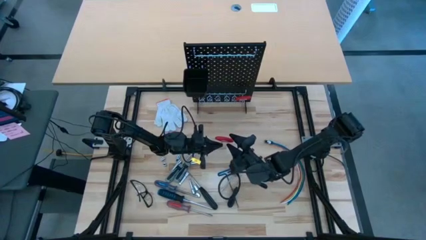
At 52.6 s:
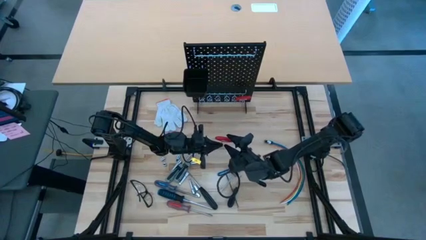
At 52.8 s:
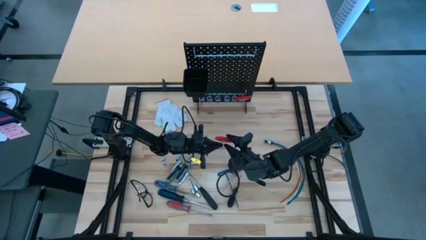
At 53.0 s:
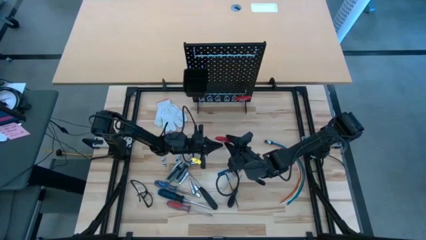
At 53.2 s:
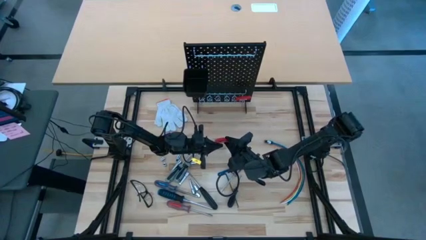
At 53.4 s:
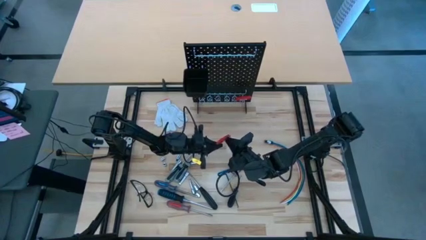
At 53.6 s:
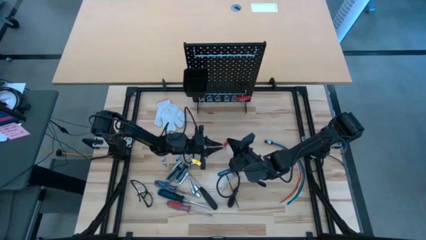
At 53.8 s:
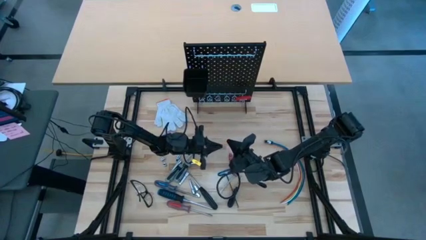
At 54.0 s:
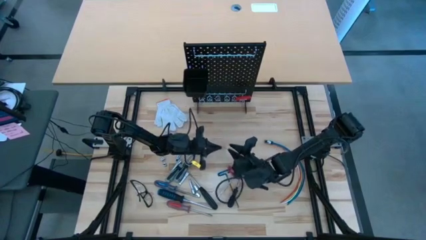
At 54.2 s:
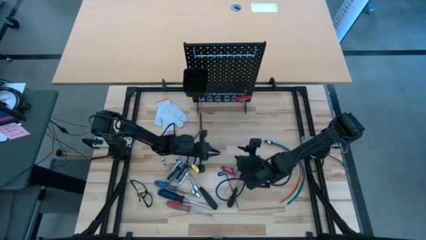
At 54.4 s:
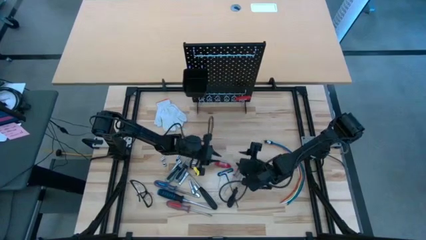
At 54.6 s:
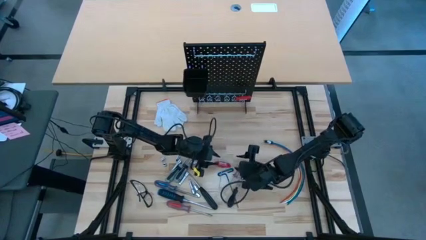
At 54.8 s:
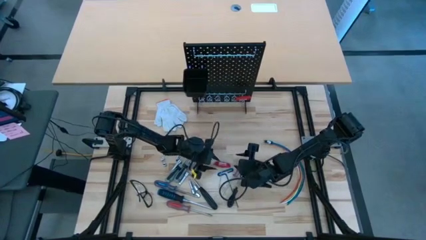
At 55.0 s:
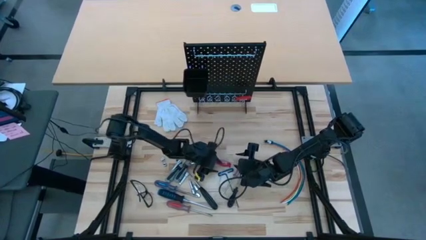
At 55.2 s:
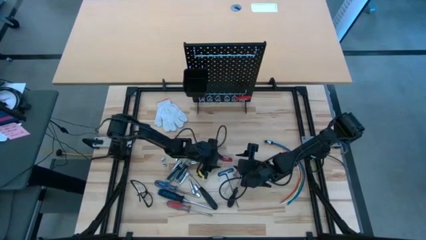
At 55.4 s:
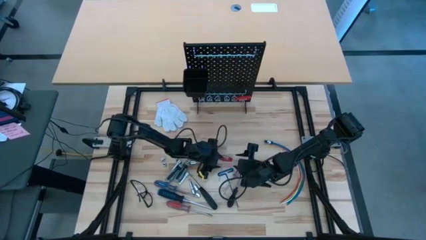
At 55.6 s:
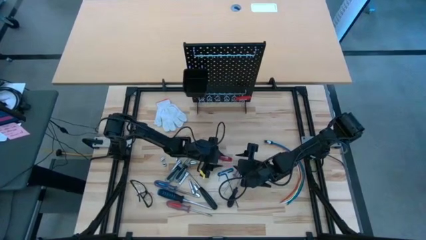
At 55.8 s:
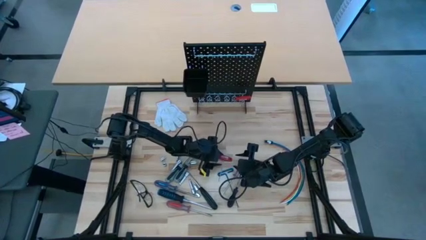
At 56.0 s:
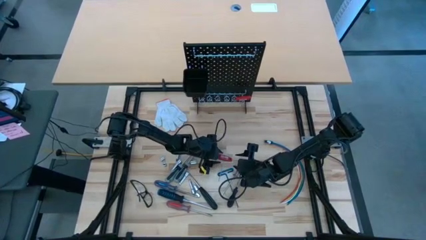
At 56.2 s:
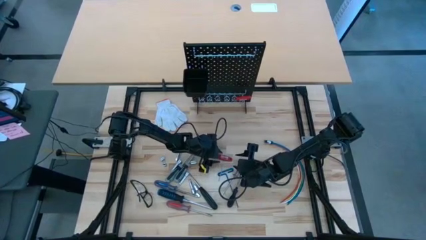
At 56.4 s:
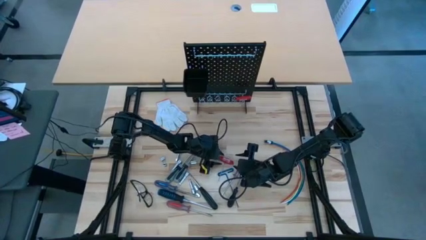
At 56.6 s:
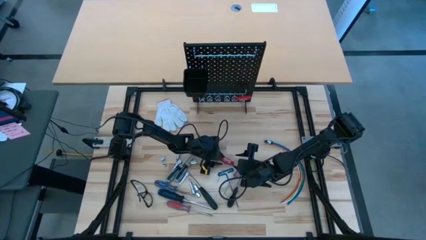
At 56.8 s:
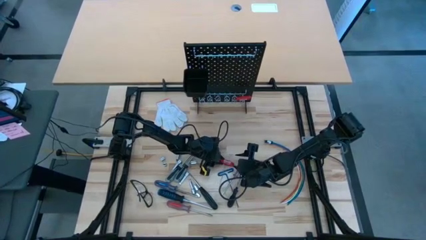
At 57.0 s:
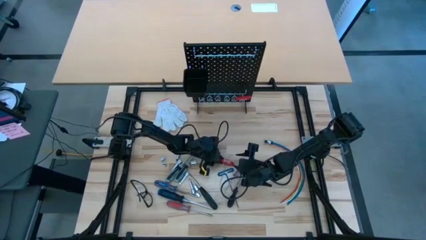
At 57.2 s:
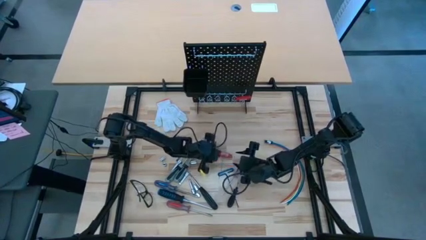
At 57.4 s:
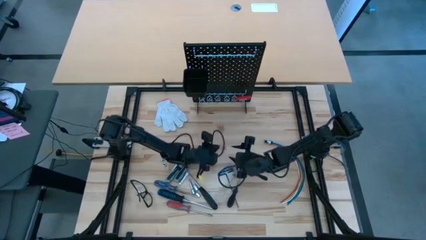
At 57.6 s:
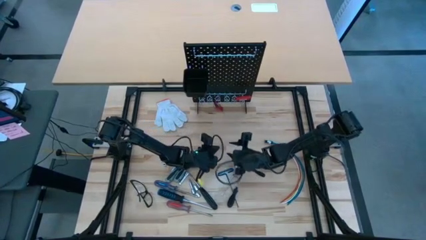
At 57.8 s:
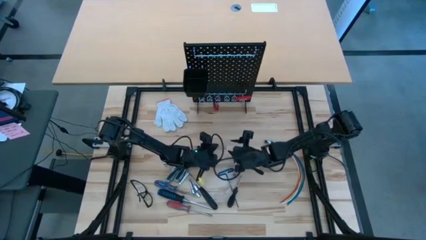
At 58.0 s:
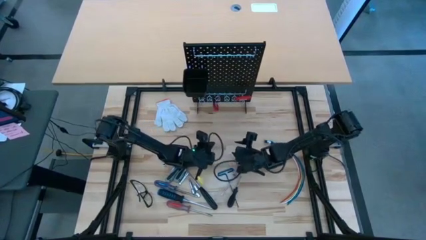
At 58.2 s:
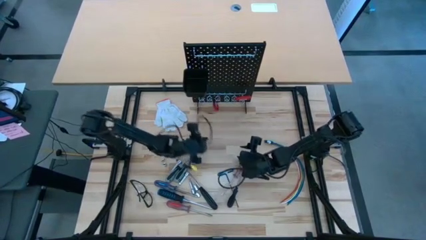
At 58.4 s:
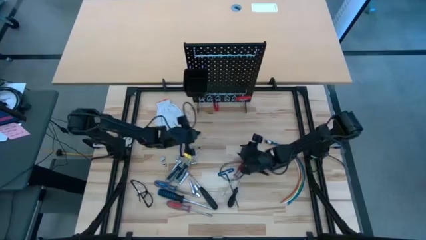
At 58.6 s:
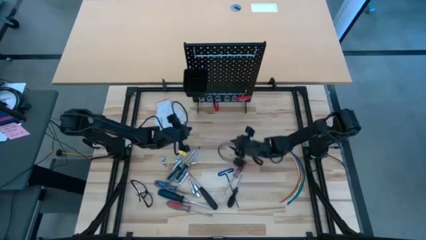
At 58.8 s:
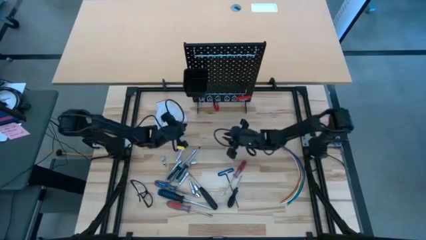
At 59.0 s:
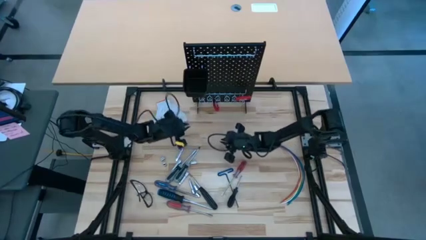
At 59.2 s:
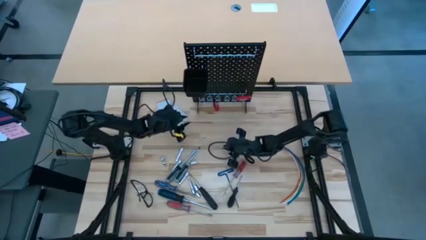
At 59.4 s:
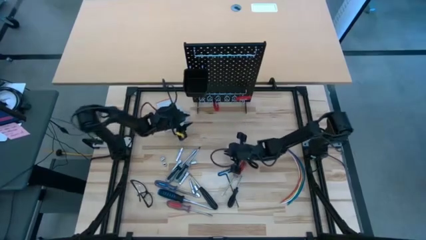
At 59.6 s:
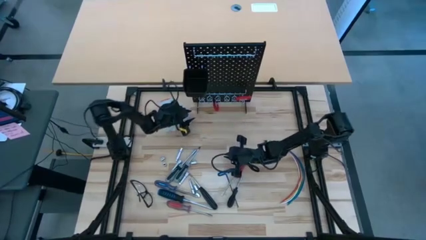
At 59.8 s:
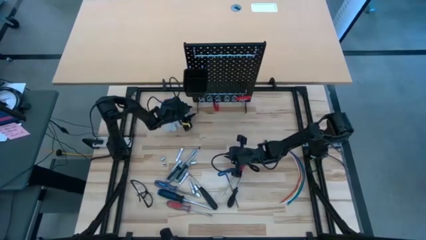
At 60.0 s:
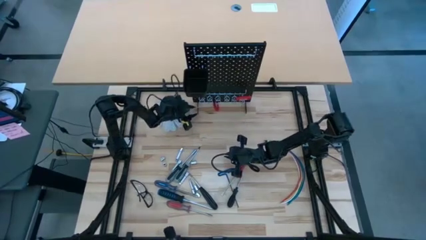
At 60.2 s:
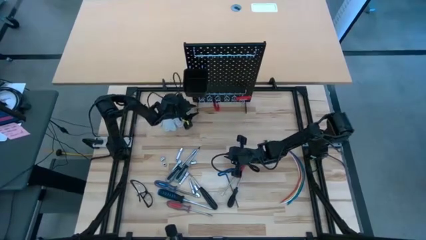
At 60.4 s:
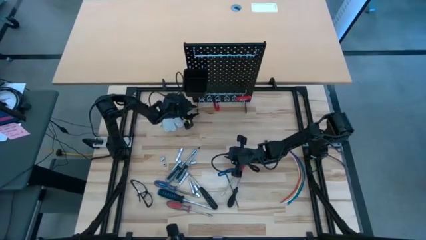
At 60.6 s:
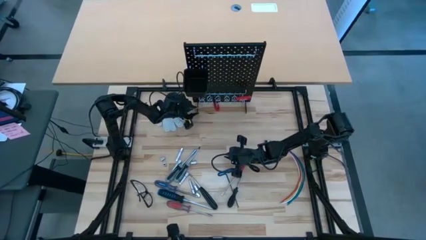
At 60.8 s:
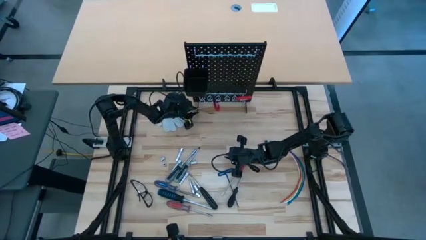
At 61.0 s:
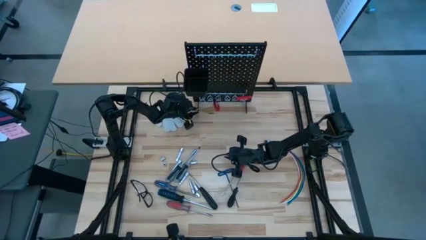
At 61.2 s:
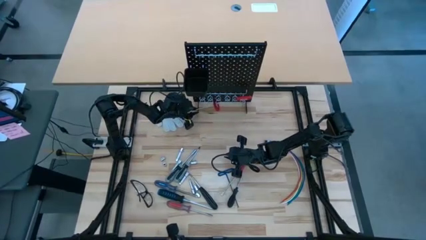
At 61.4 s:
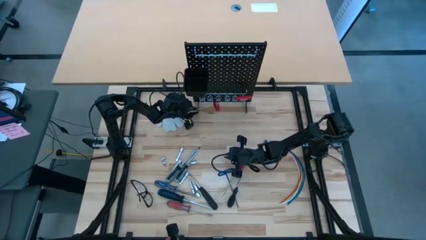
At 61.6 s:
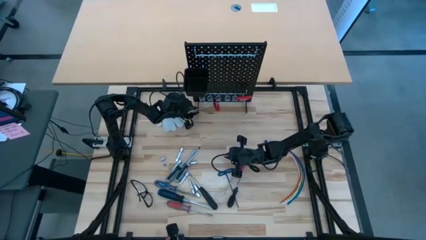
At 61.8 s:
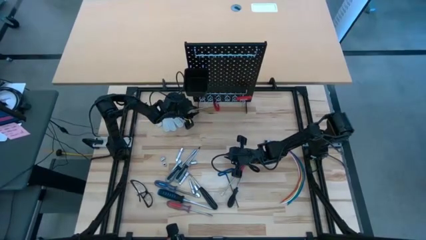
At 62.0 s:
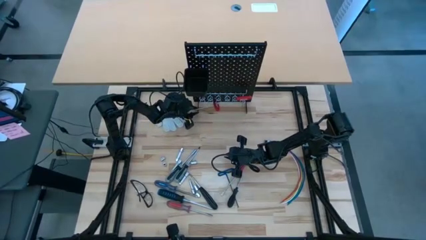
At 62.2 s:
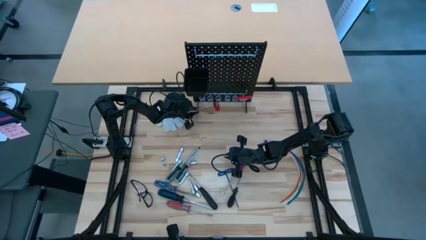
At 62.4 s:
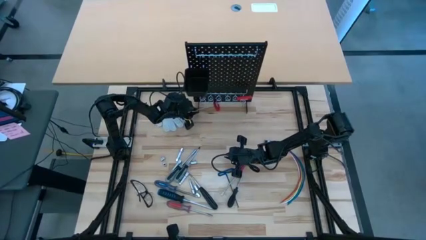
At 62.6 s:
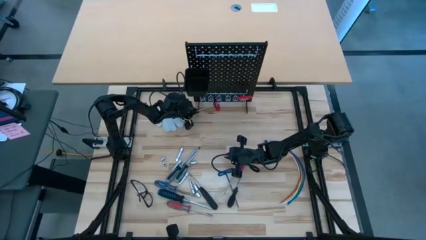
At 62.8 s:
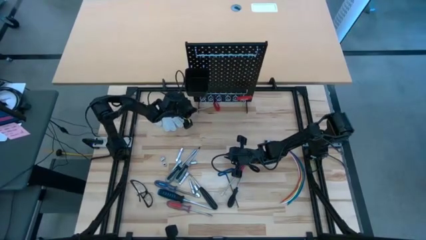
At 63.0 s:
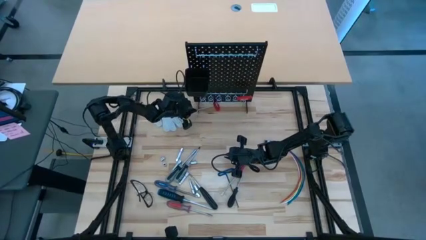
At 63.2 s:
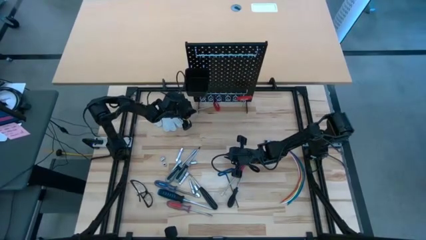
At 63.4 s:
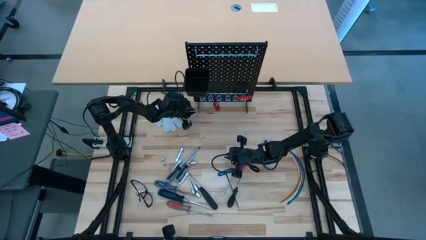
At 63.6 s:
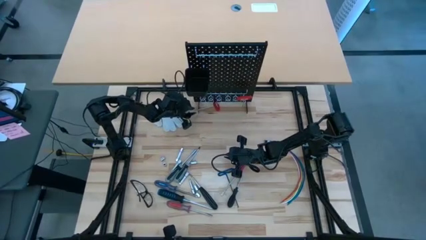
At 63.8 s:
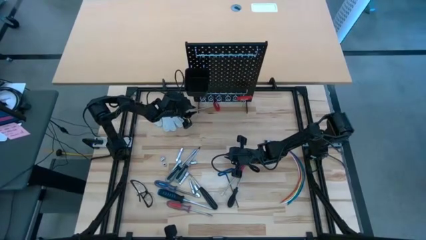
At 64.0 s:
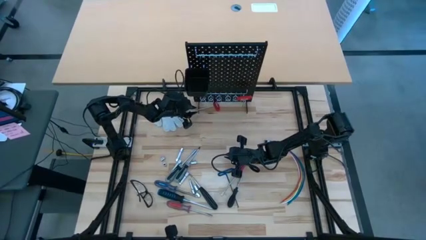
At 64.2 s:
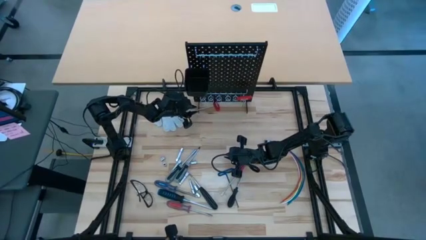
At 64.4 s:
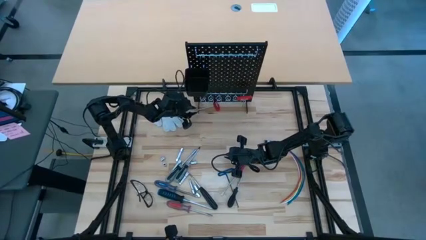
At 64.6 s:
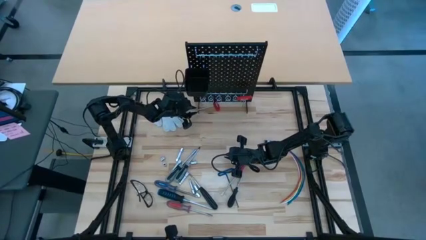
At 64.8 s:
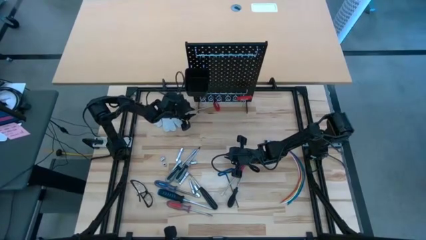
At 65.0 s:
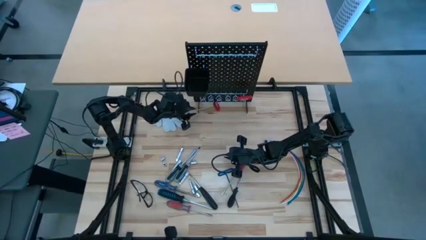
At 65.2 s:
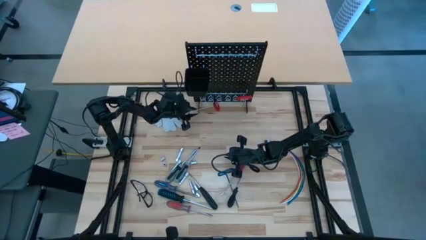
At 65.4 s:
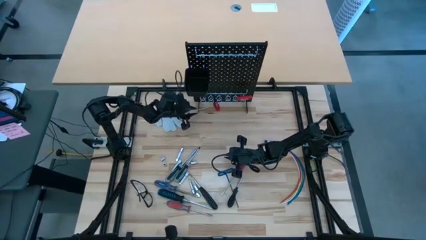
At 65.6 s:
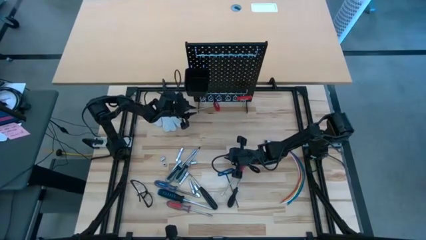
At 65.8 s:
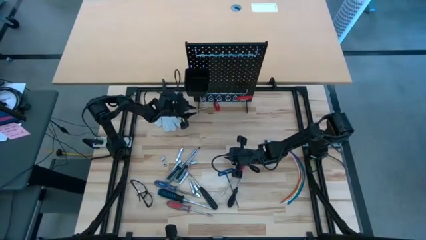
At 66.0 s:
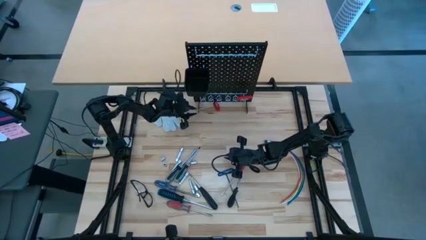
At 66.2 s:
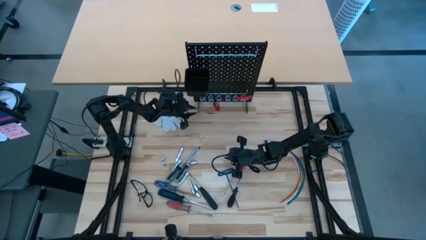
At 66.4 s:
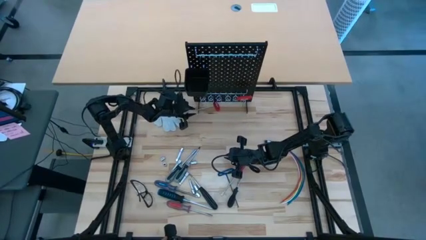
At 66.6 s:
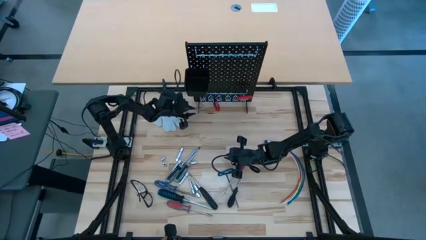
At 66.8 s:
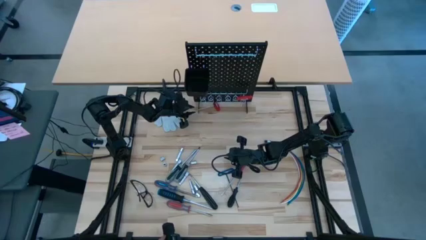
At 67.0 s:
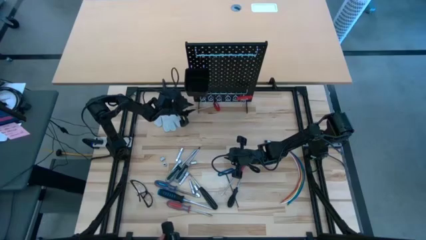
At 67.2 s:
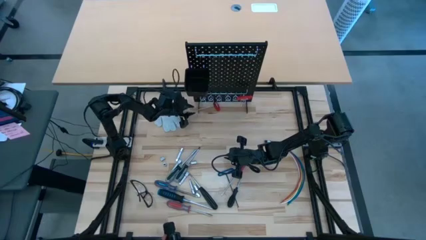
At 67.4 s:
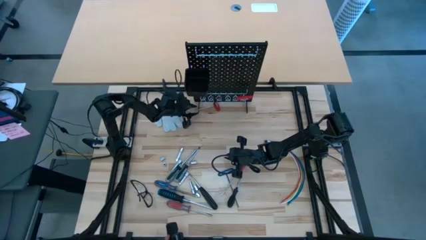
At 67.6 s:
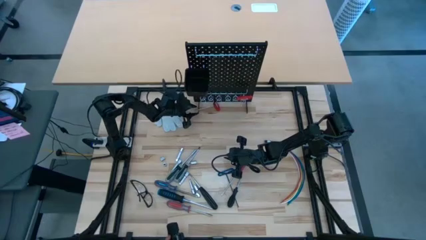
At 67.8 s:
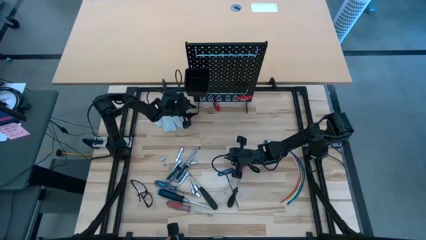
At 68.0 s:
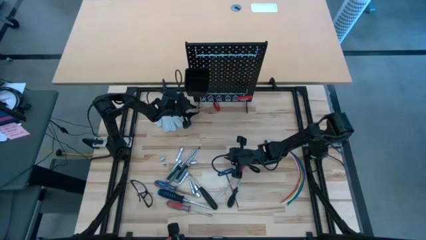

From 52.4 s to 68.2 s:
Task: Hang tools onto peg board
Hang the red allen wrench on the pegboard
